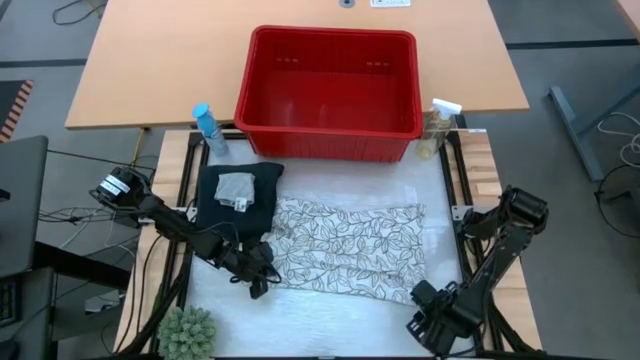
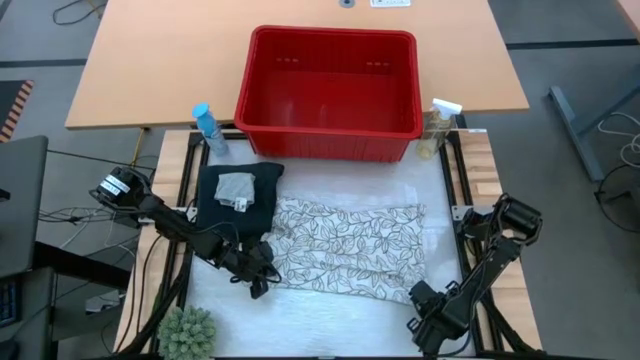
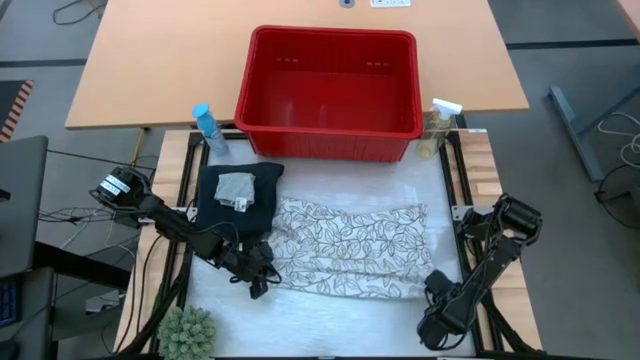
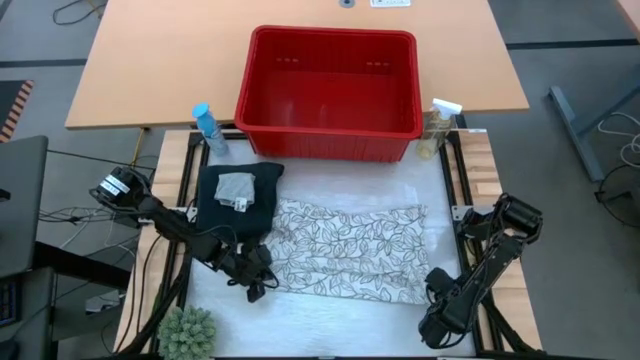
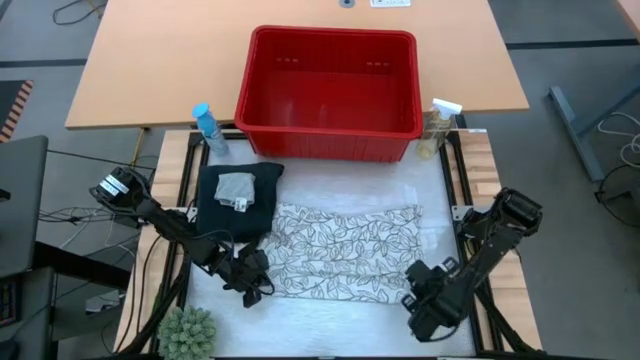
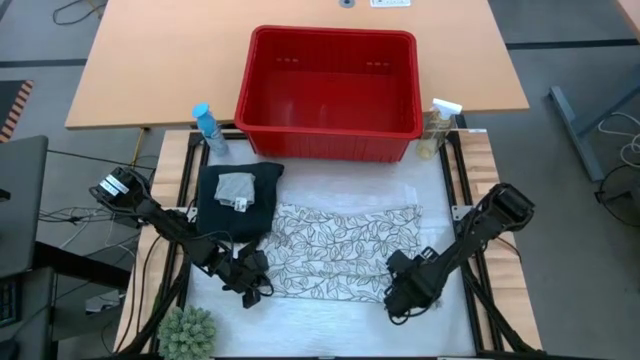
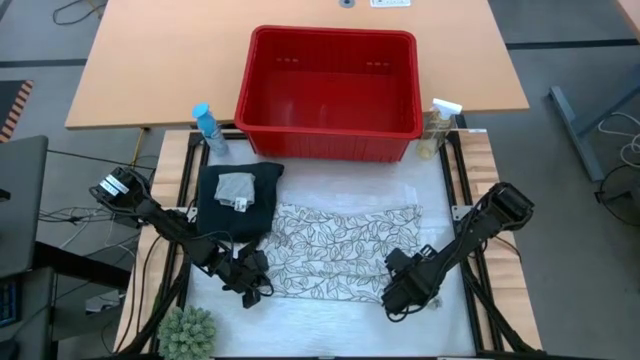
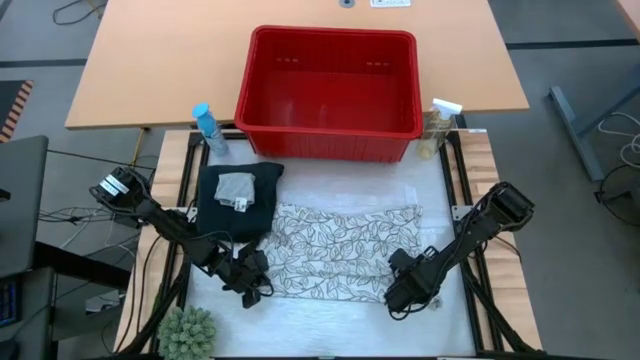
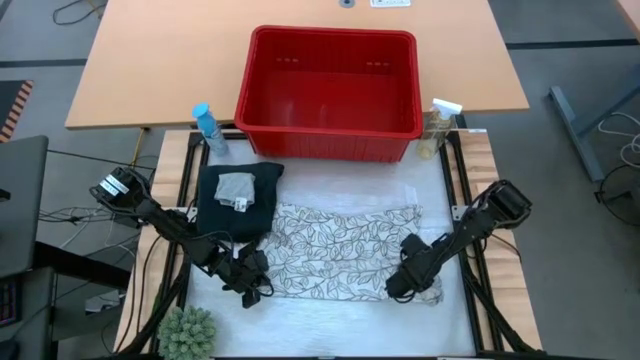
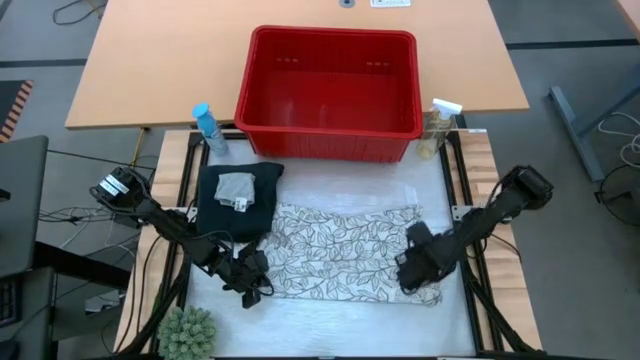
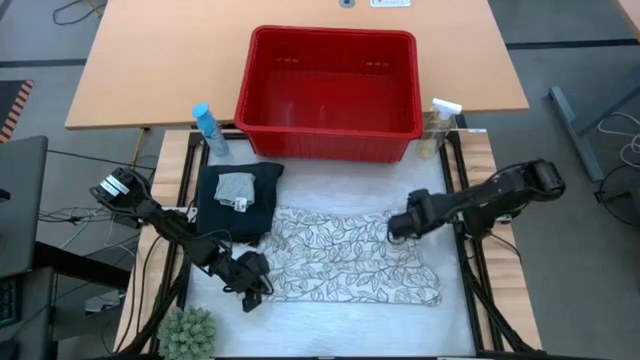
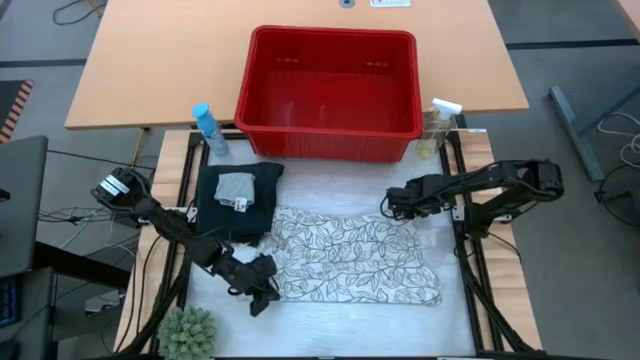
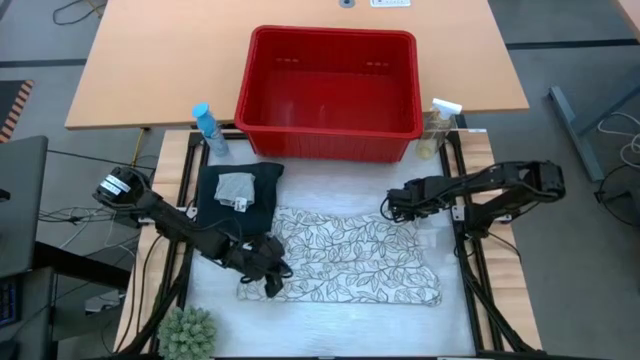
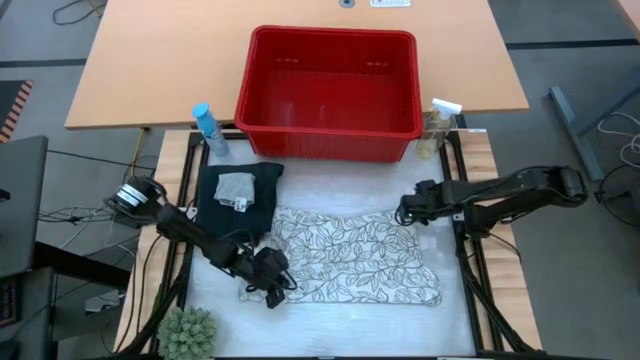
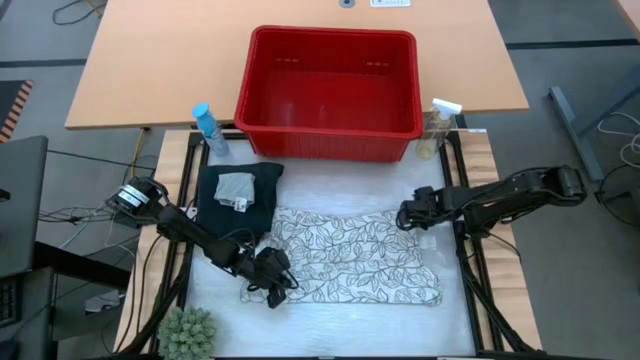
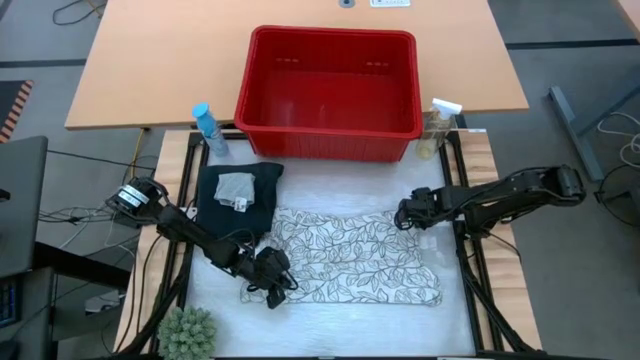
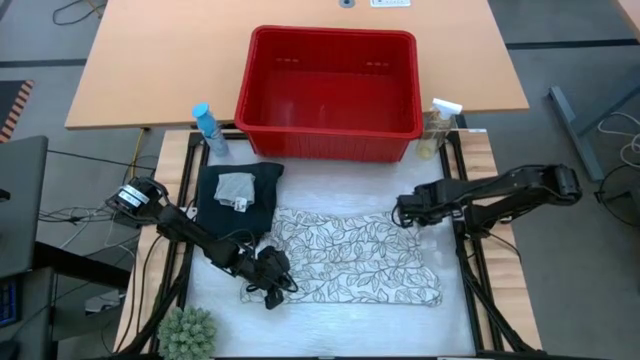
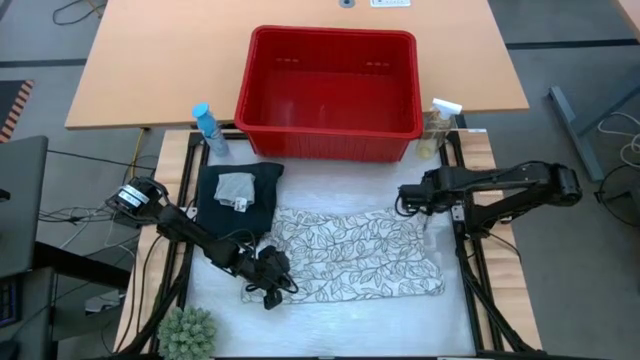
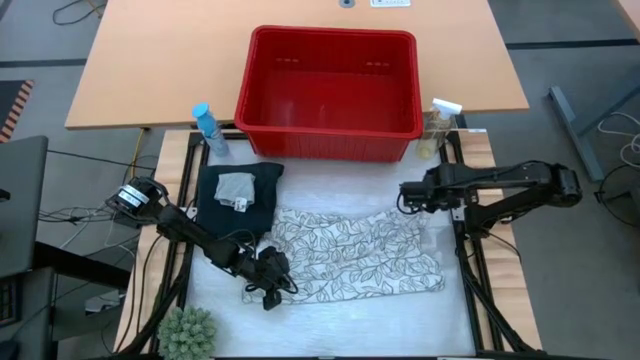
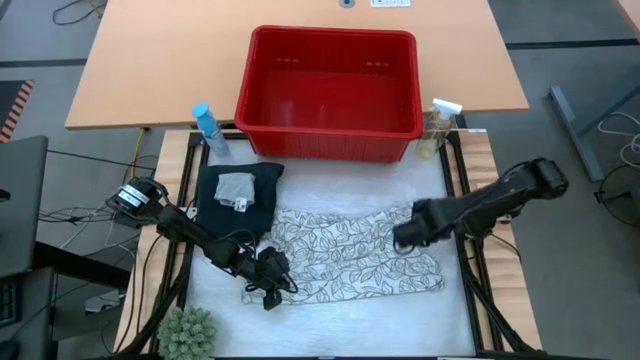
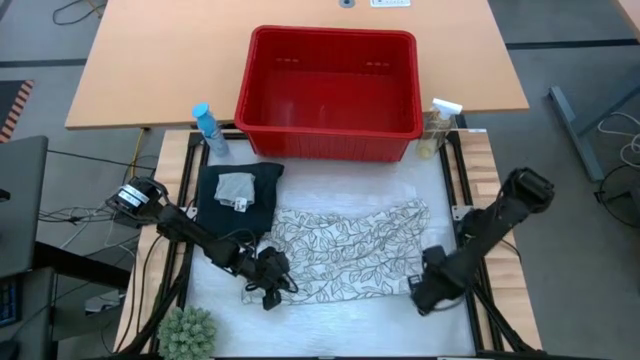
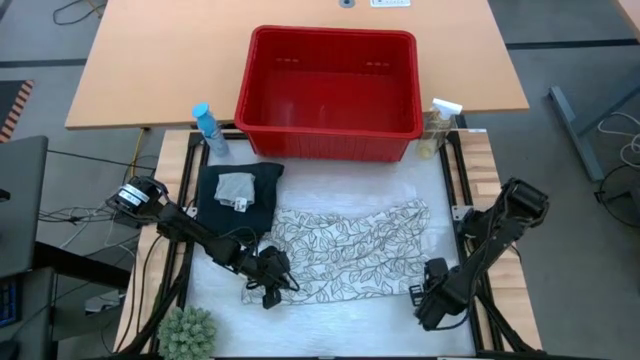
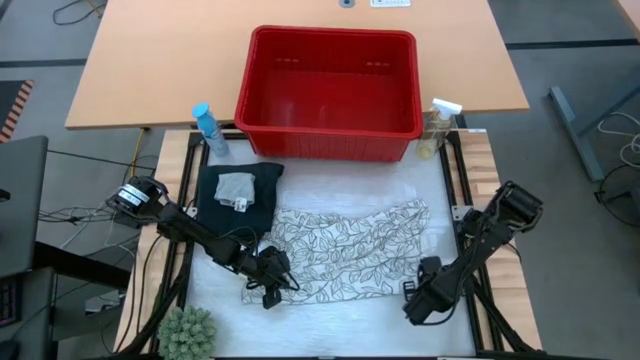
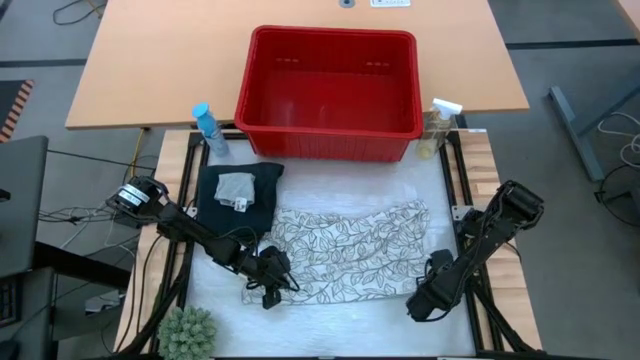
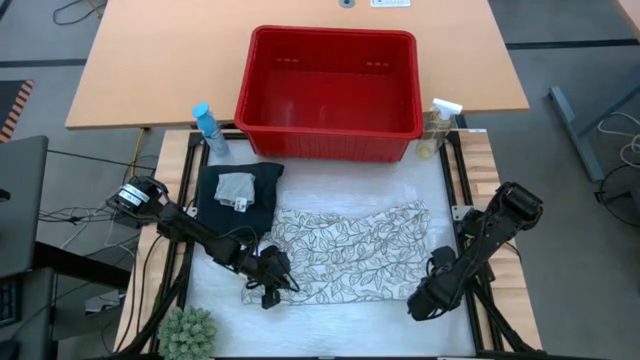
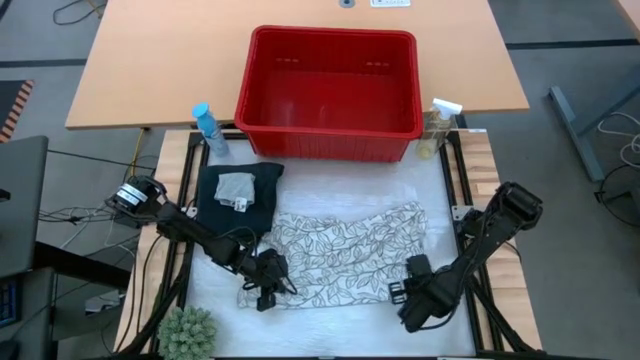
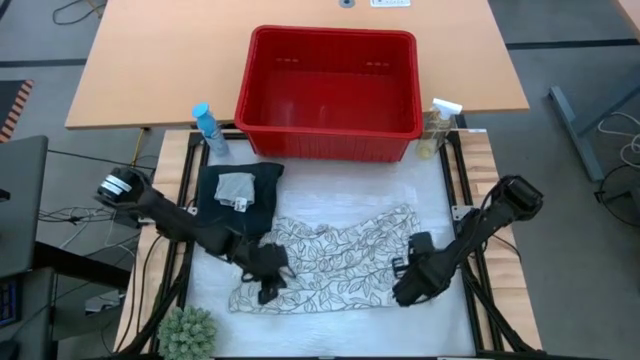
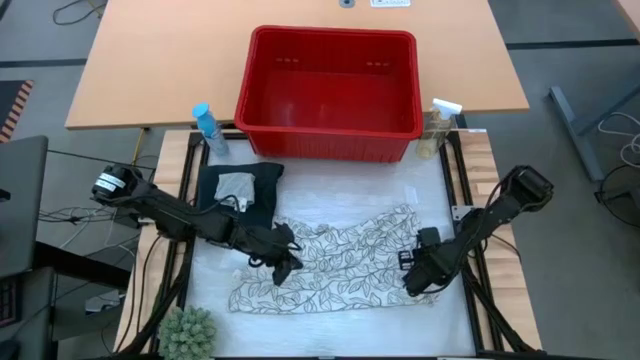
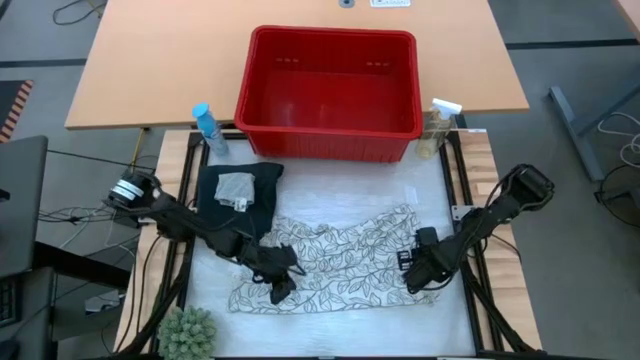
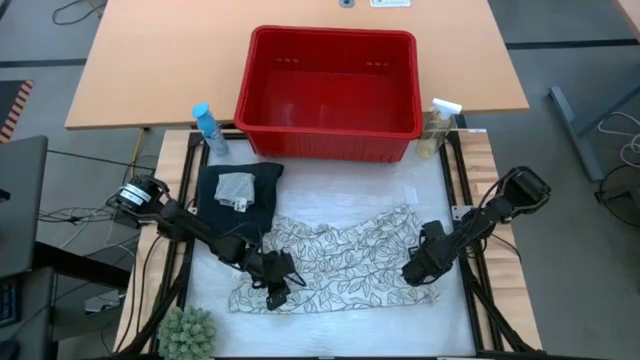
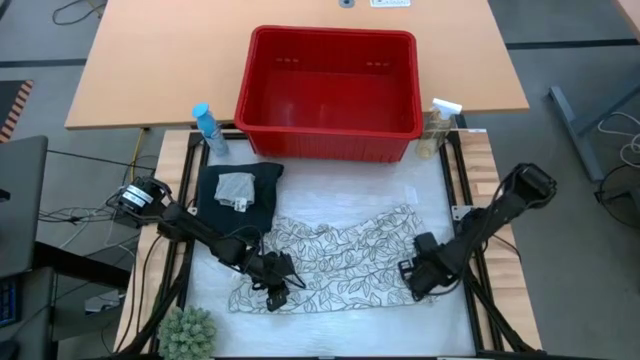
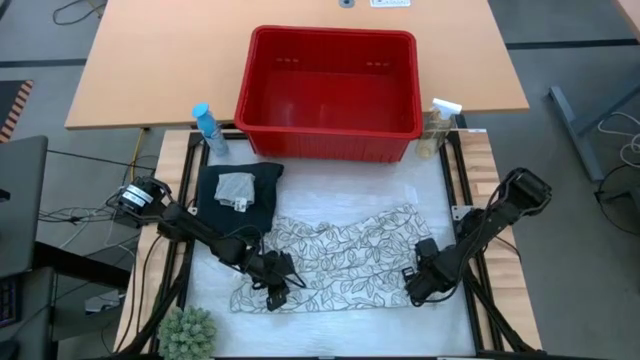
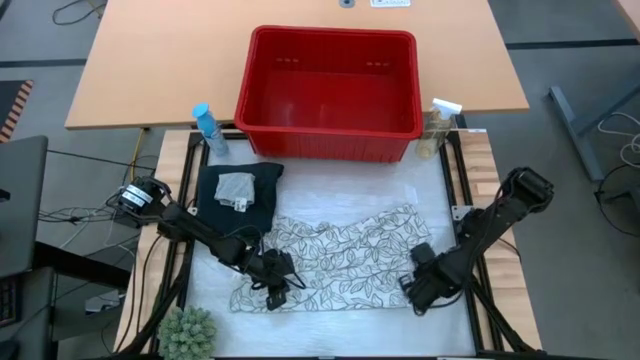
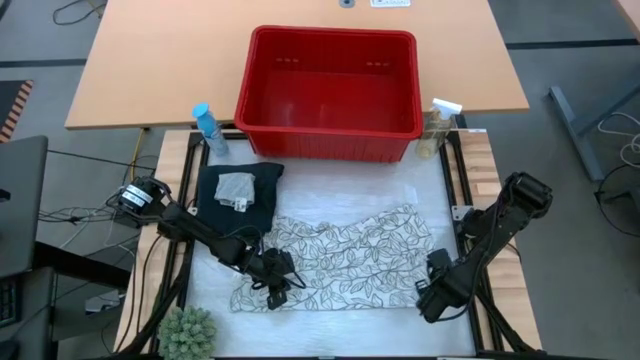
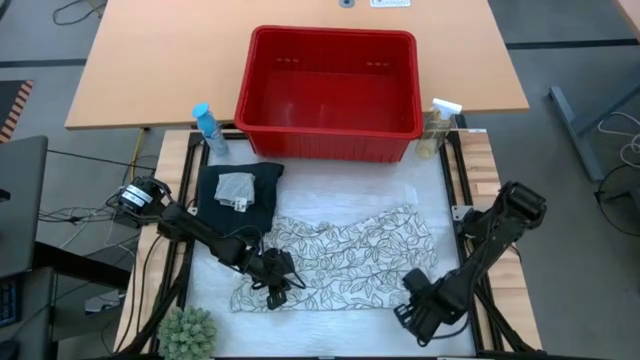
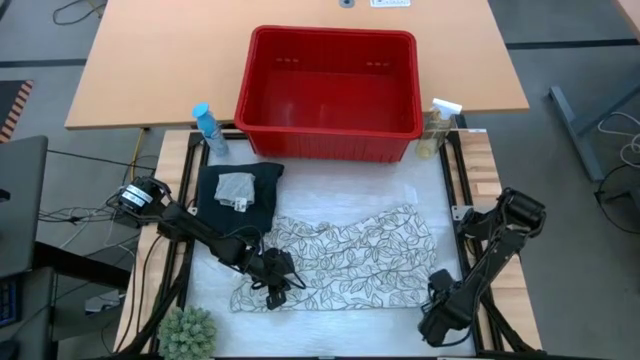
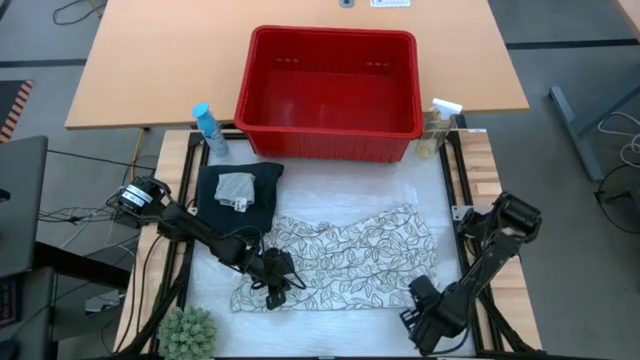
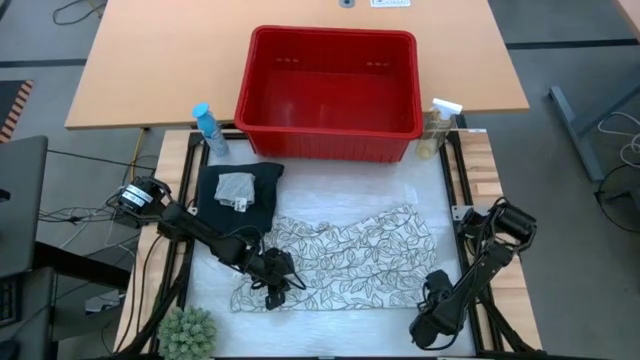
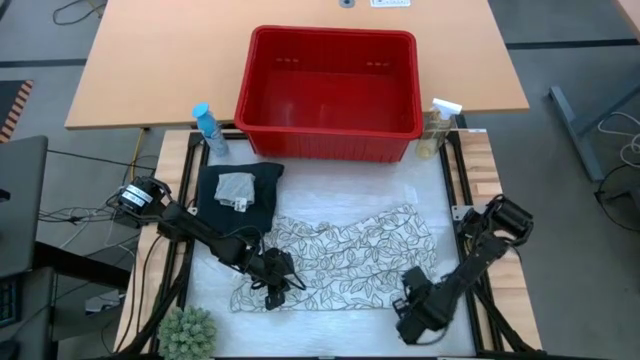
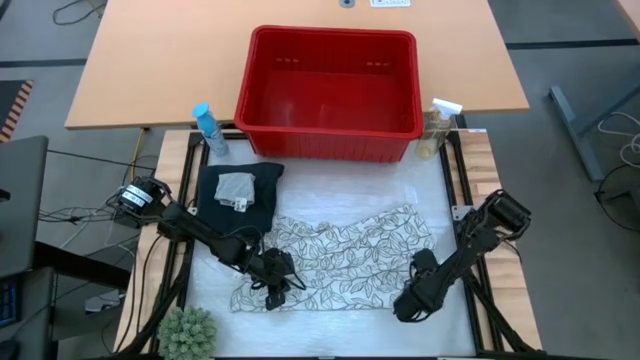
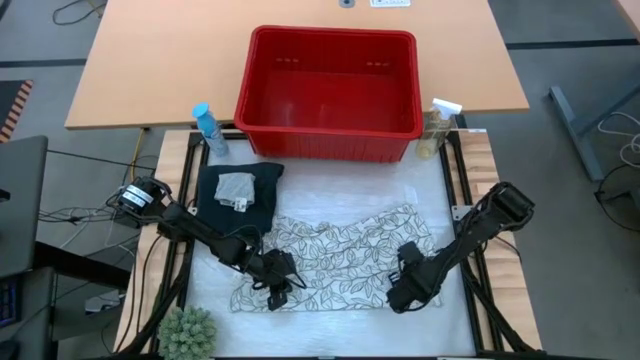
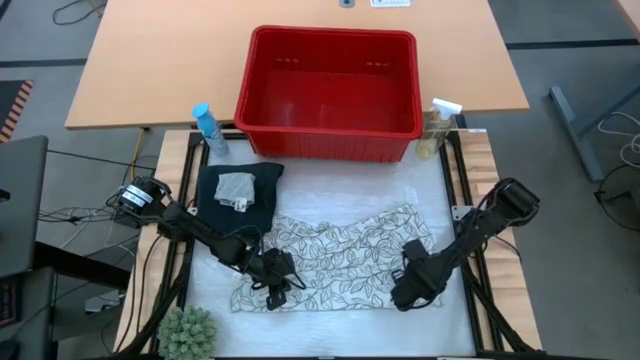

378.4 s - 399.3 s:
Task: Fold Laundry from Bin
Fold the white patterned shirt
